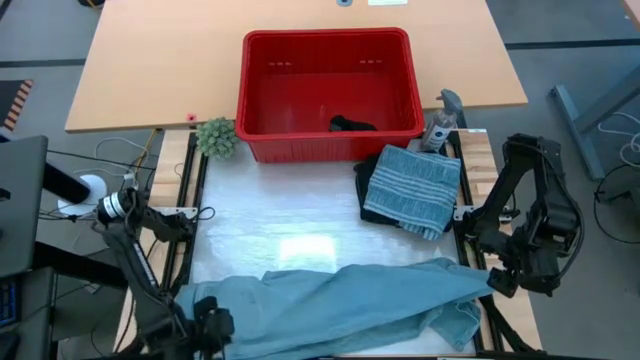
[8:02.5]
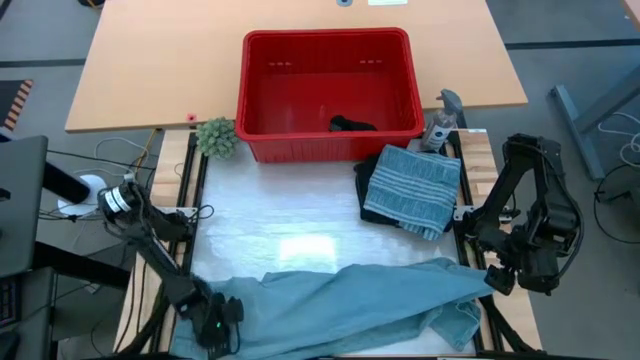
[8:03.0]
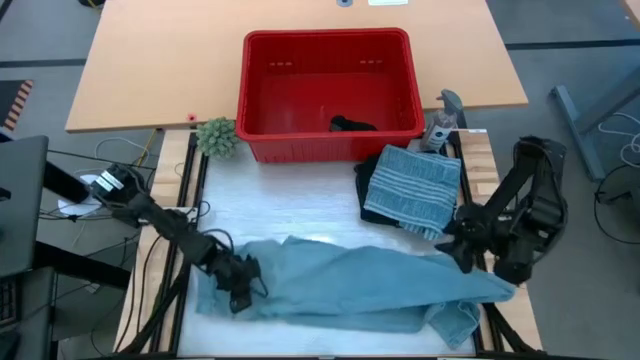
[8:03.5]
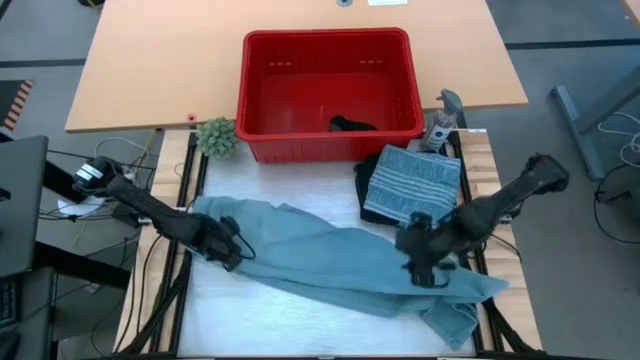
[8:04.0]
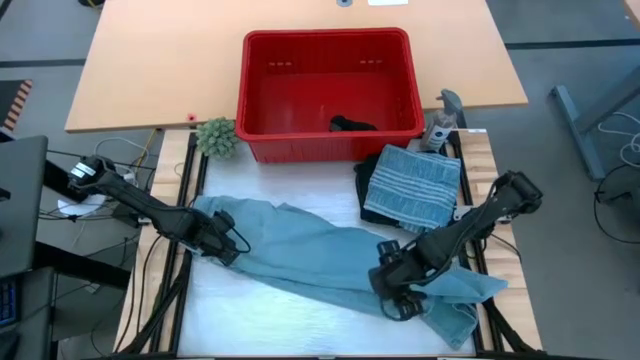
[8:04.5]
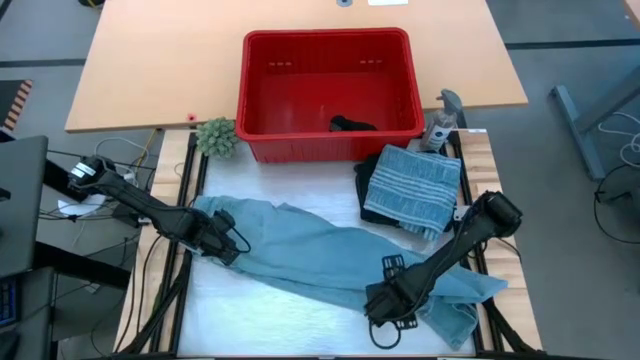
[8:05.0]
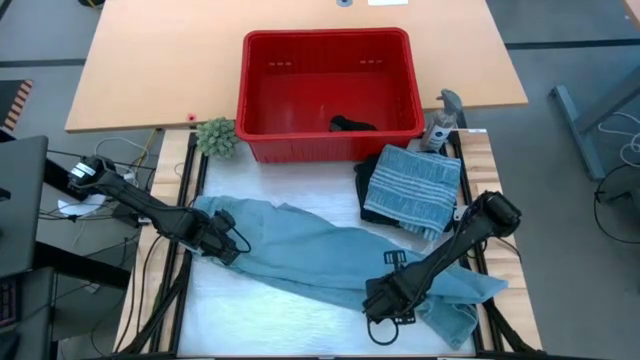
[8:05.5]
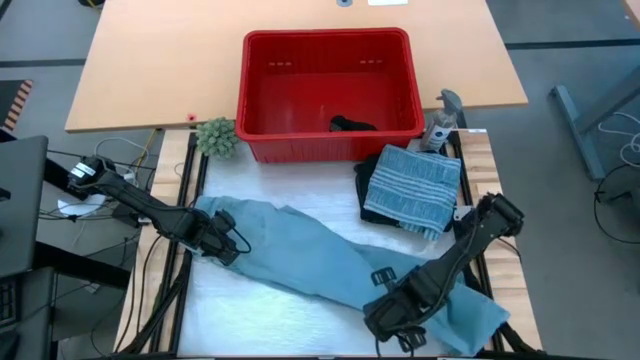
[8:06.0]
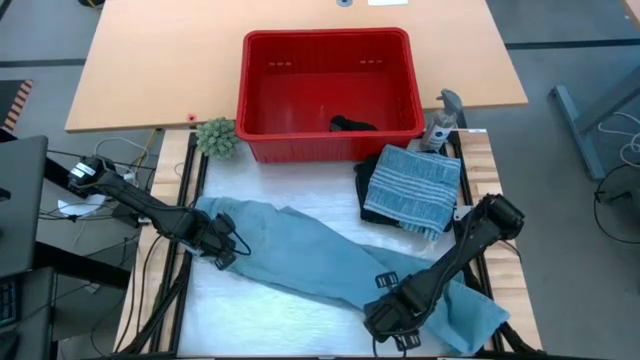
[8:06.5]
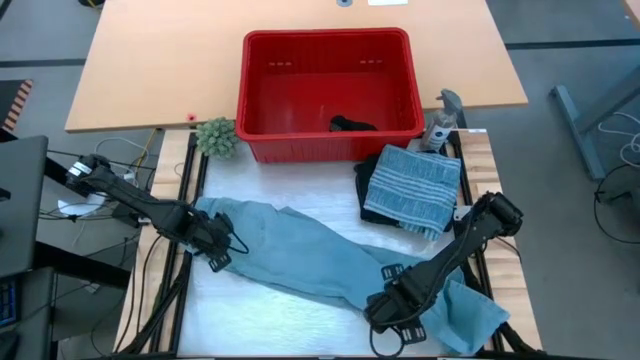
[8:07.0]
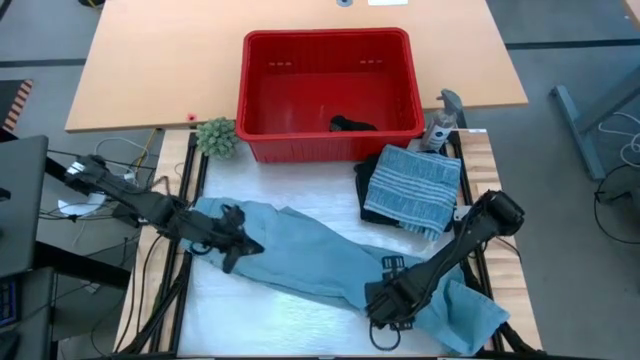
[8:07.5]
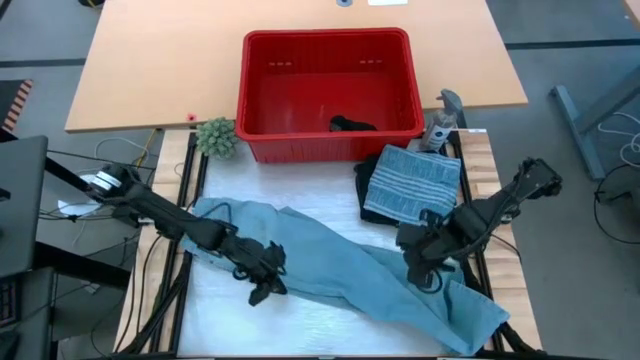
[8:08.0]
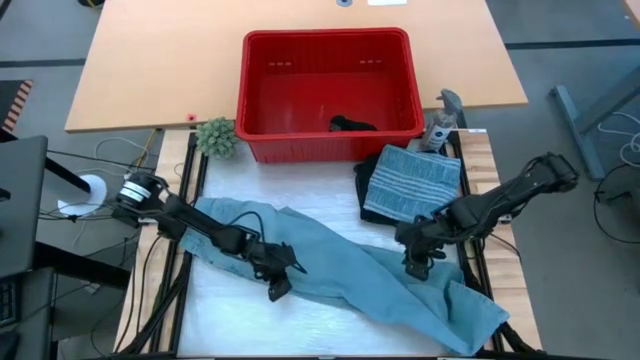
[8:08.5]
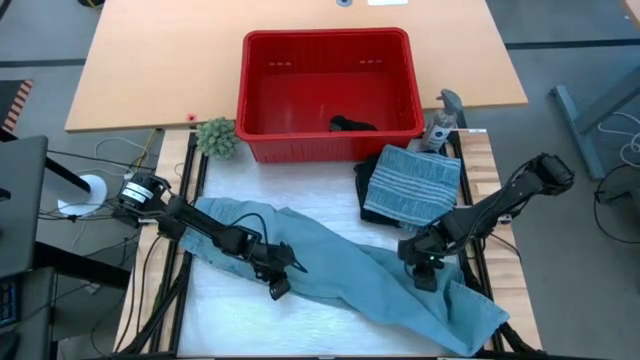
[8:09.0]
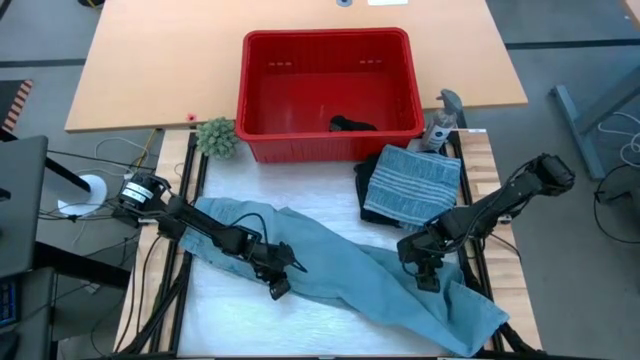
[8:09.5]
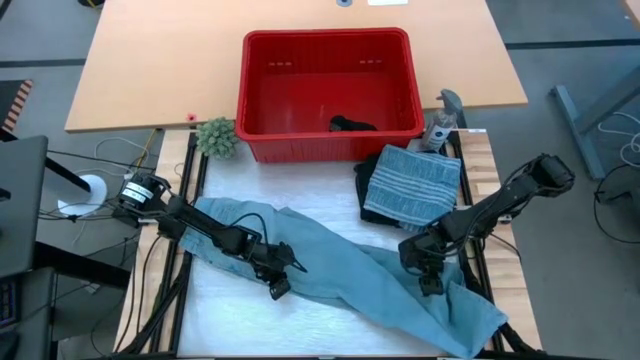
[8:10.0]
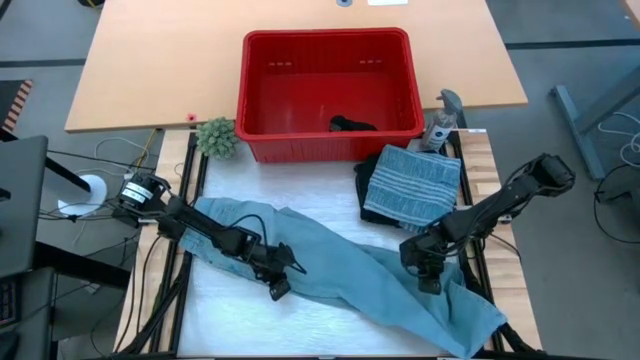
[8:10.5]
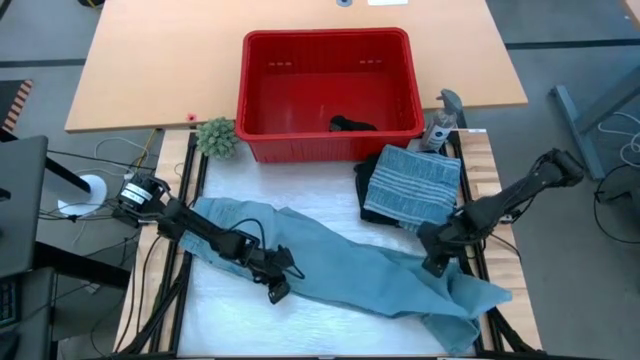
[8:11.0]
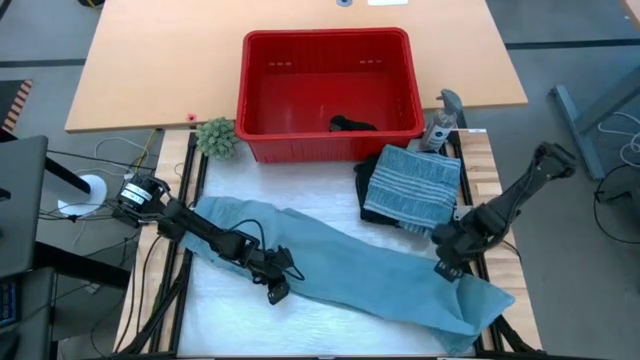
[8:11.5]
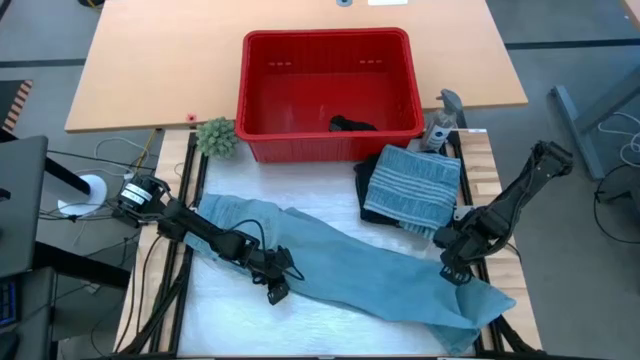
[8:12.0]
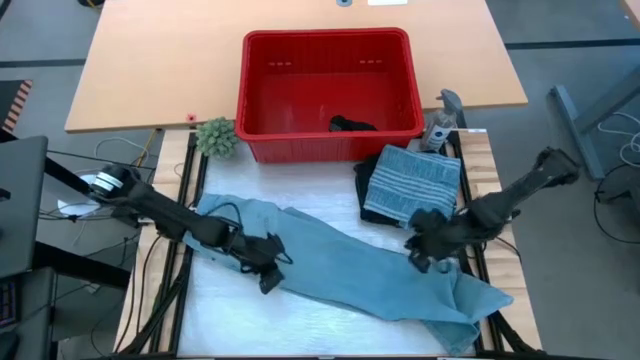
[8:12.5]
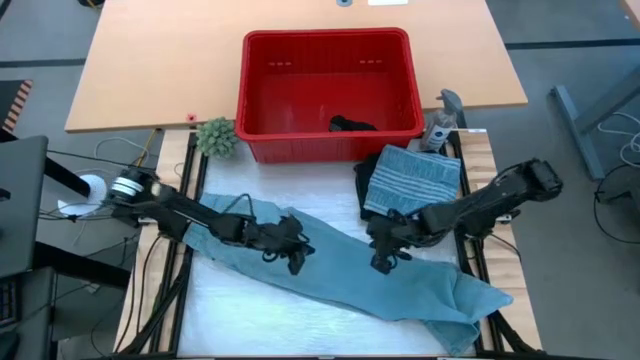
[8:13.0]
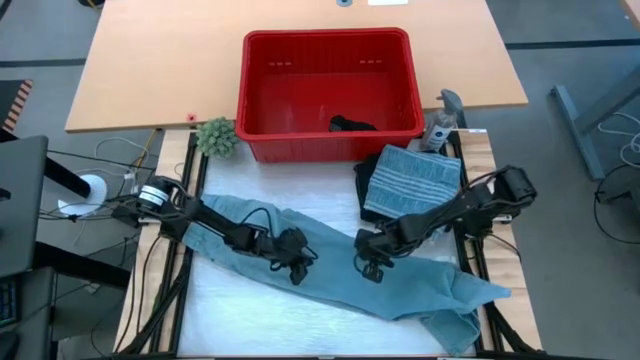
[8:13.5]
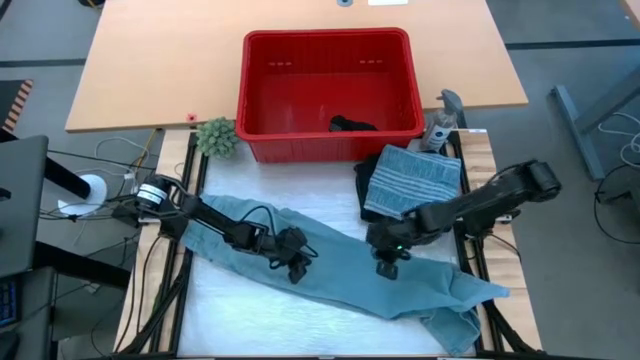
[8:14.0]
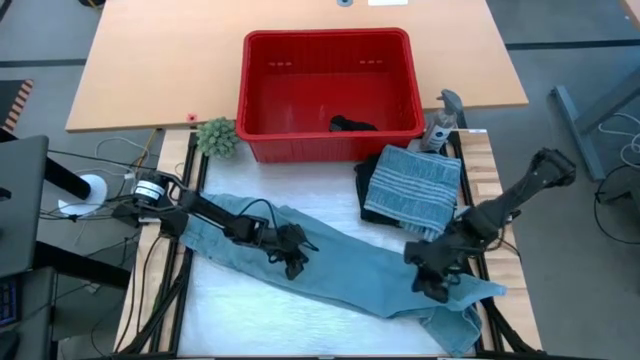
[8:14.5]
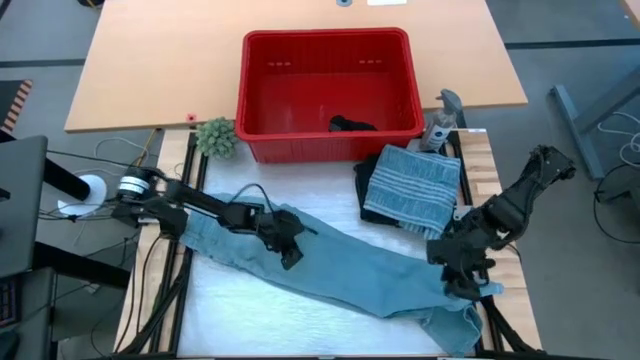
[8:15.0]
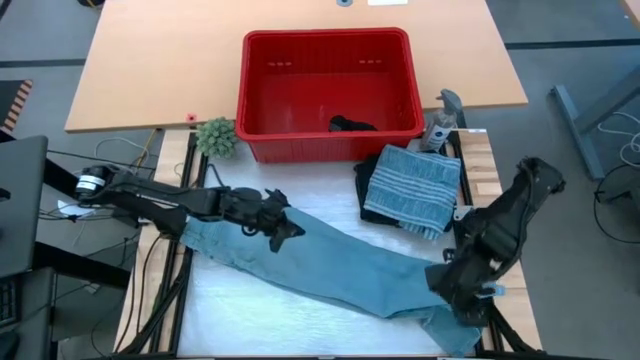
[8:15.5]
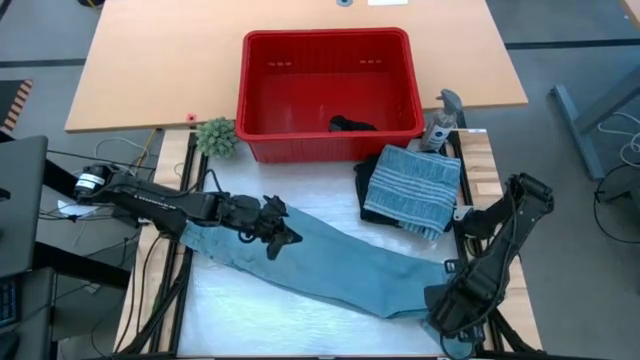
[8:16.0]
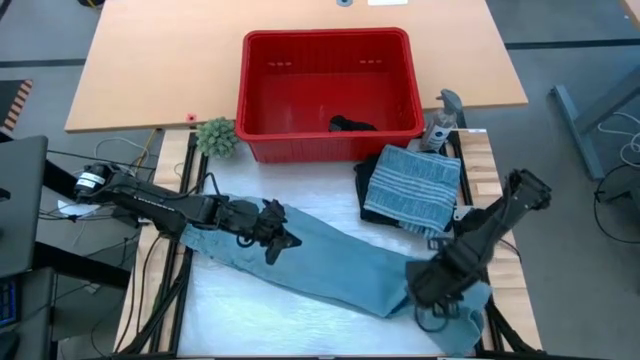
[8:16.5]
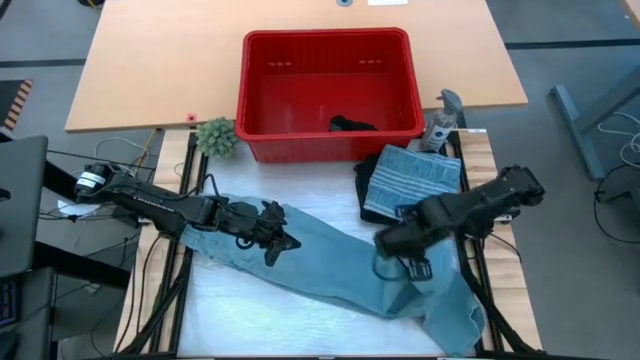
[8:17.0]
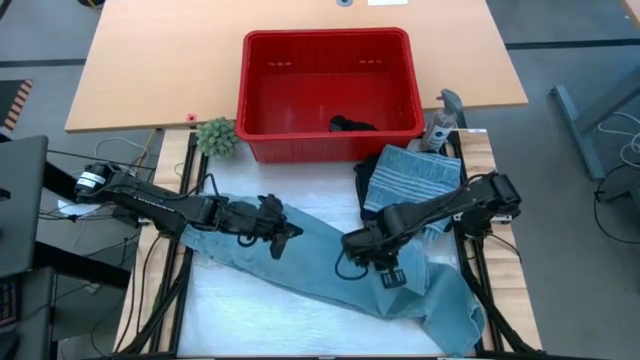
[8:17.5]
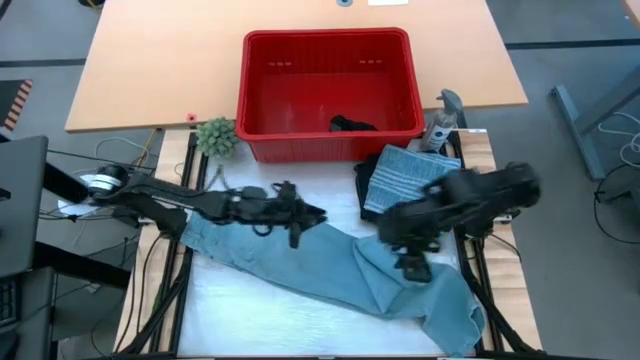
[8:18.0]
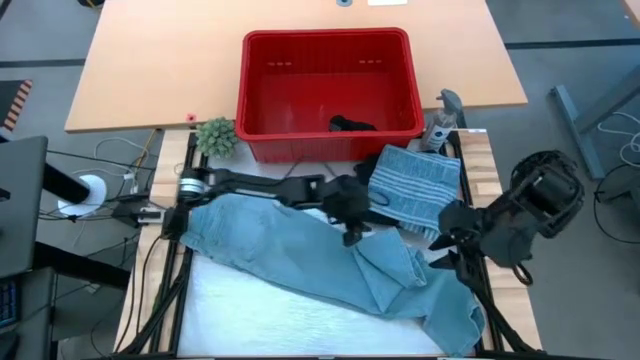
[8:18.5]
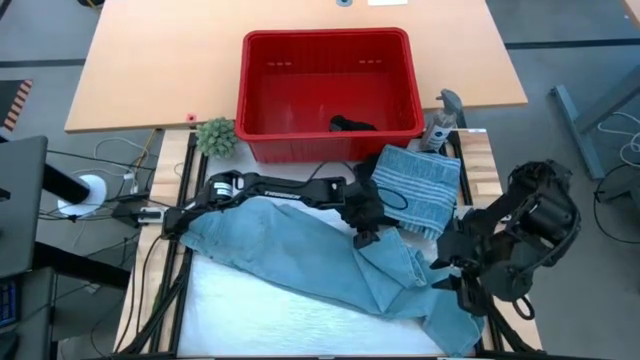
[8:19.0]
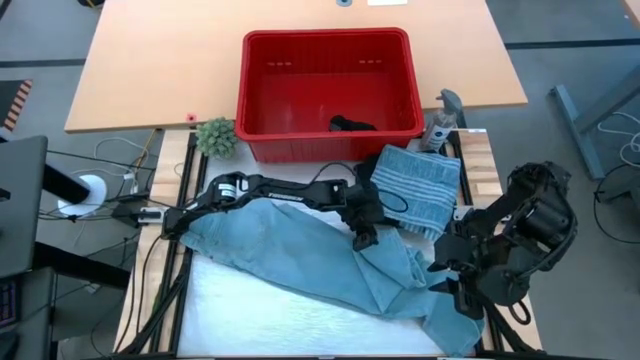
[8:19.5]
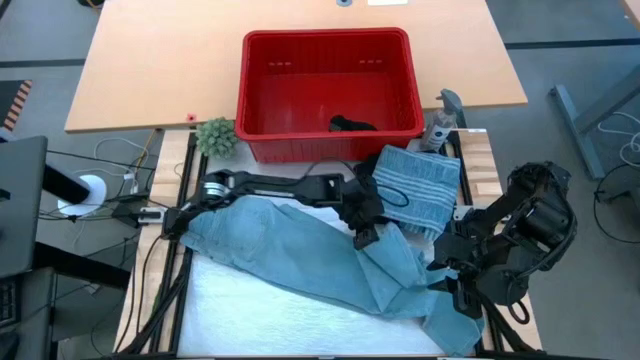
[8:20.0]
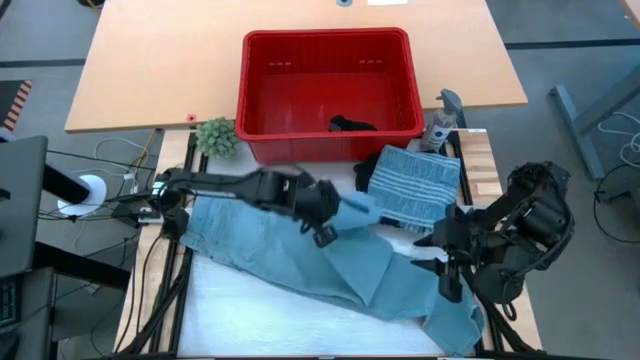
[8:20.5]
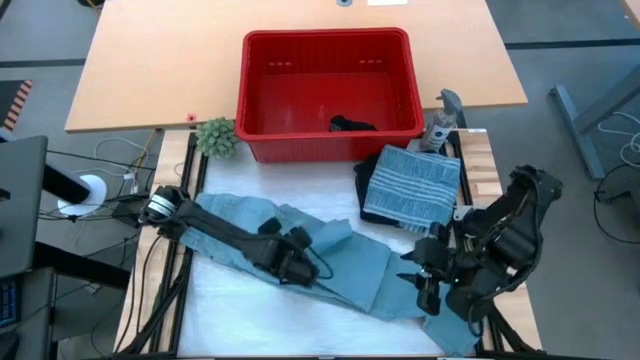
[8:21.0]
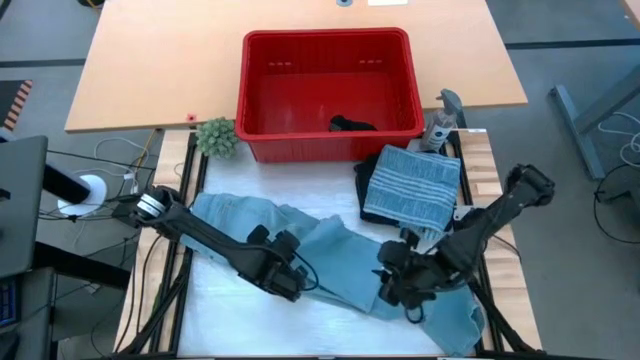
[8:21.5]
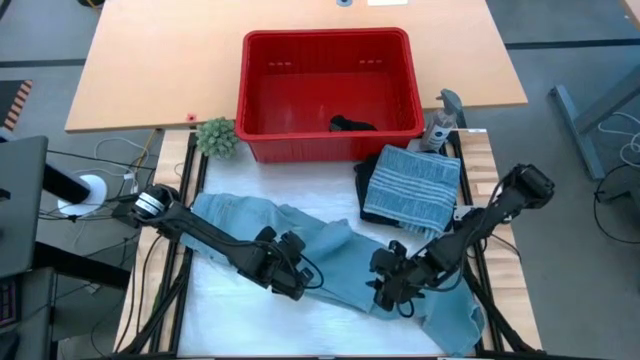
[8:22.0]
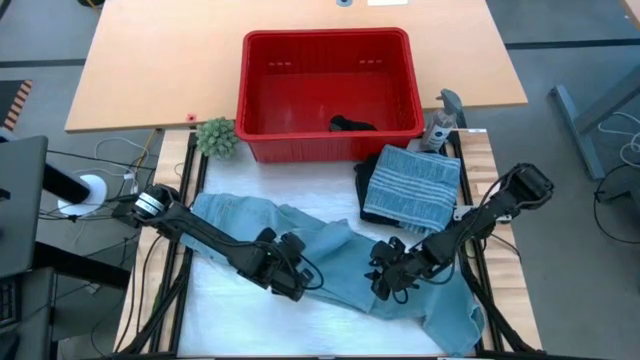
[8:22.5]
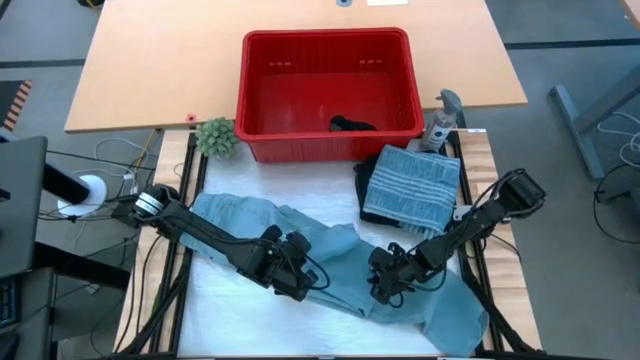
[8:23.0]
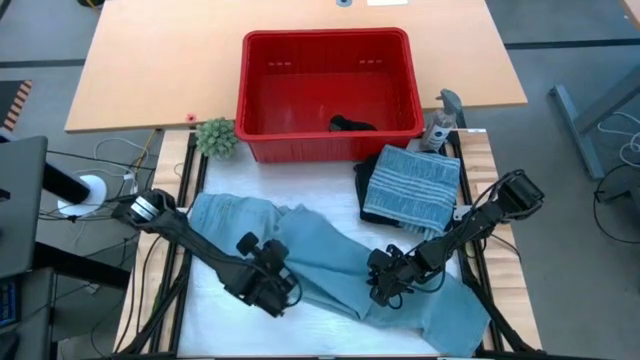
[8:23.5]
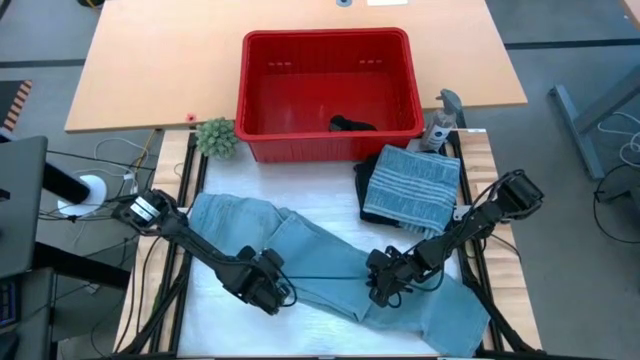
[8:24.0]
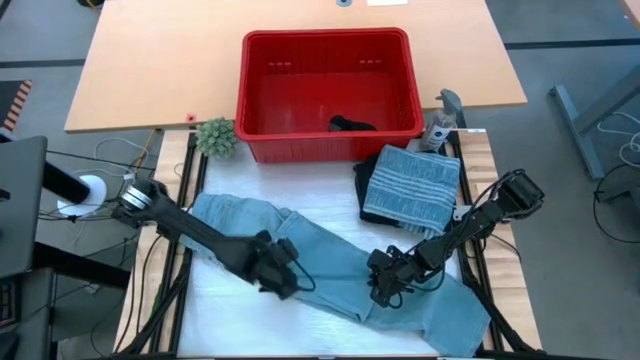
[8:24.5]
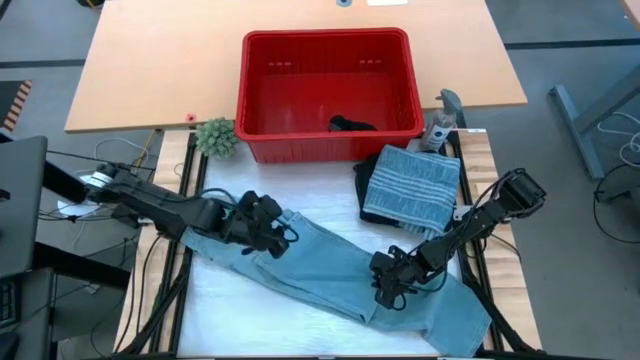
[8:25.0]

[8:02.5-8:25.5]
Task: Fold Laundry from Bin
Fold the blue pants
